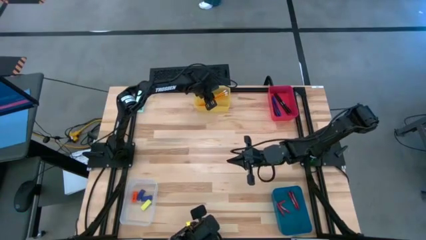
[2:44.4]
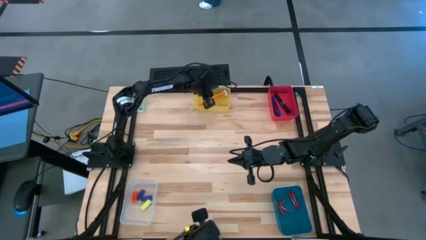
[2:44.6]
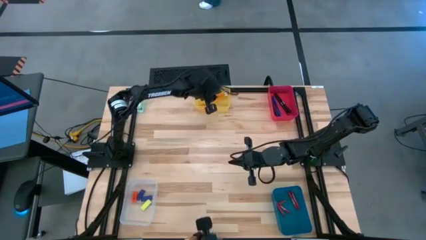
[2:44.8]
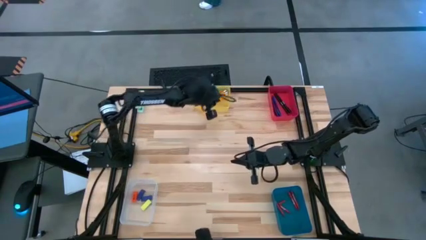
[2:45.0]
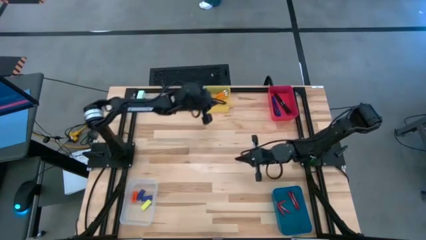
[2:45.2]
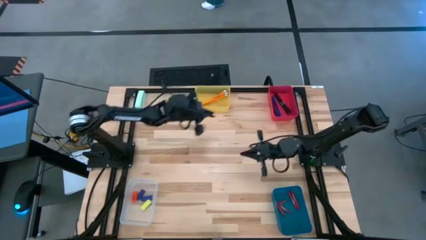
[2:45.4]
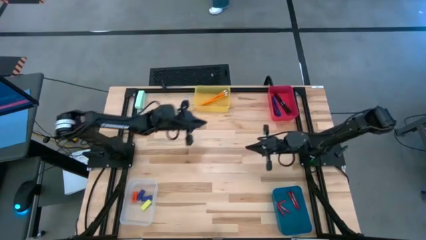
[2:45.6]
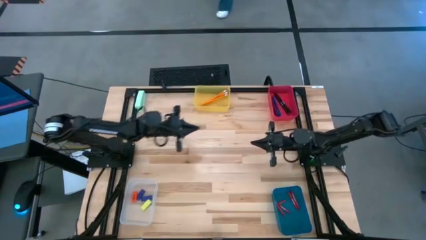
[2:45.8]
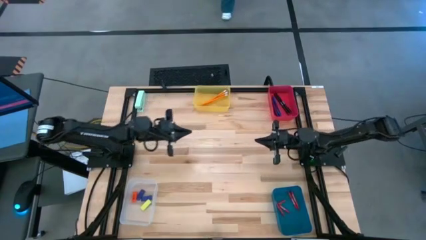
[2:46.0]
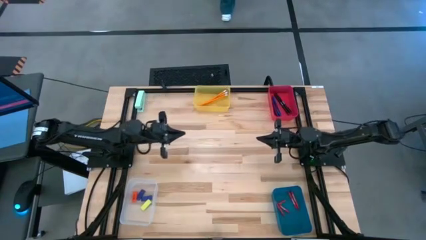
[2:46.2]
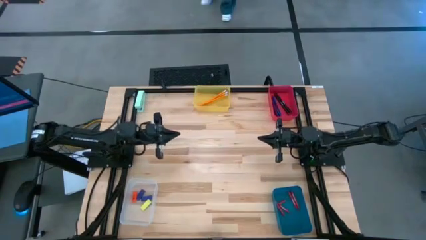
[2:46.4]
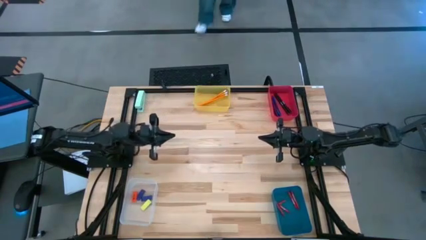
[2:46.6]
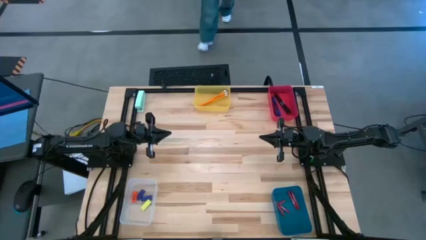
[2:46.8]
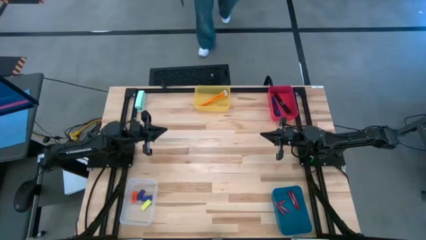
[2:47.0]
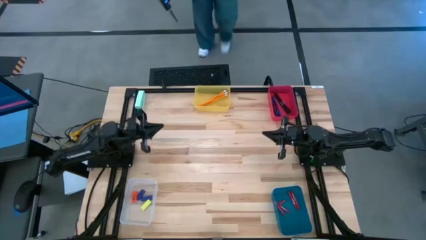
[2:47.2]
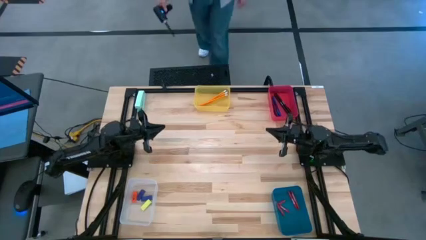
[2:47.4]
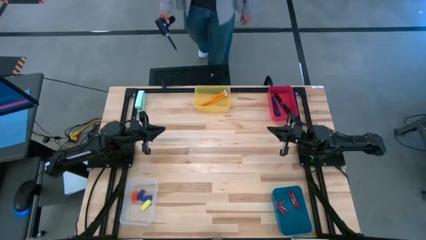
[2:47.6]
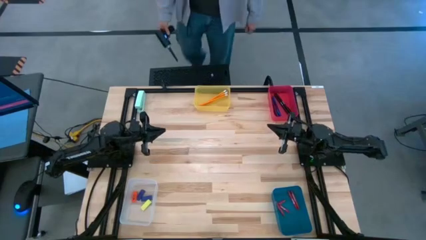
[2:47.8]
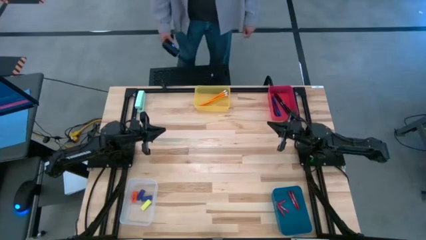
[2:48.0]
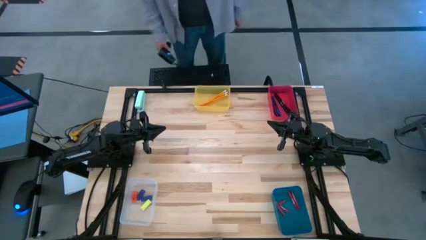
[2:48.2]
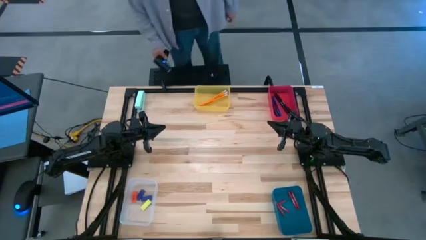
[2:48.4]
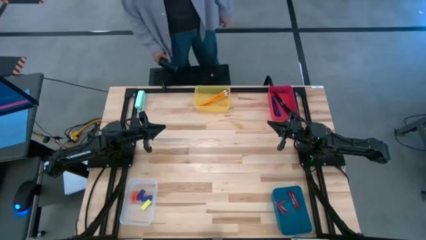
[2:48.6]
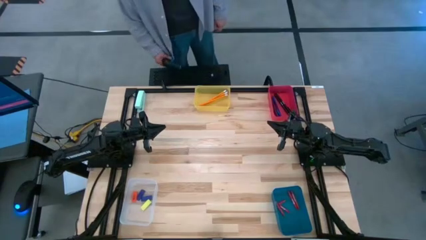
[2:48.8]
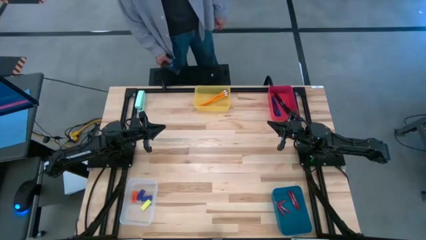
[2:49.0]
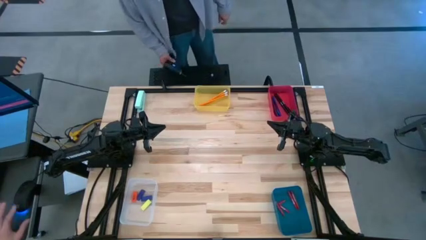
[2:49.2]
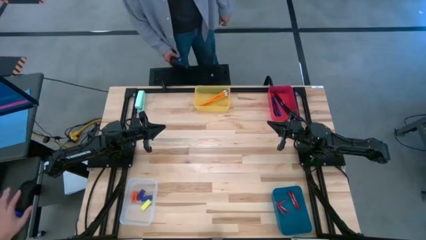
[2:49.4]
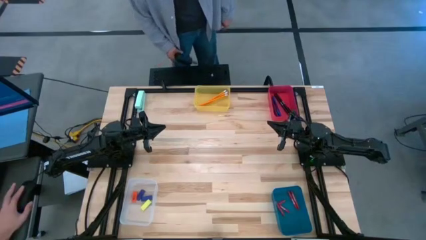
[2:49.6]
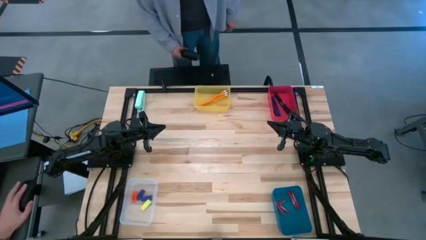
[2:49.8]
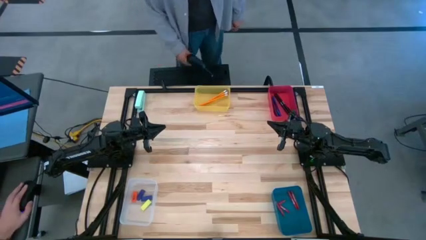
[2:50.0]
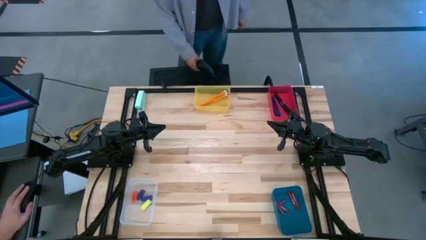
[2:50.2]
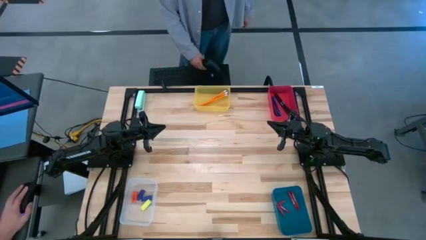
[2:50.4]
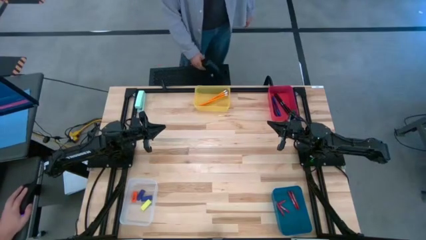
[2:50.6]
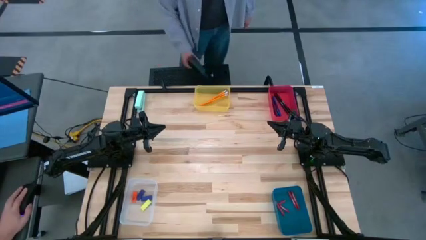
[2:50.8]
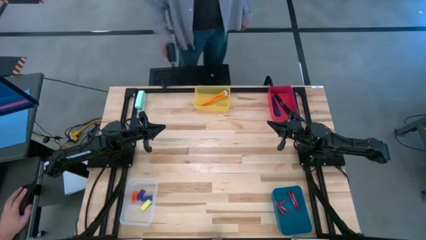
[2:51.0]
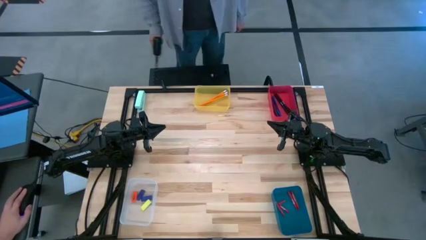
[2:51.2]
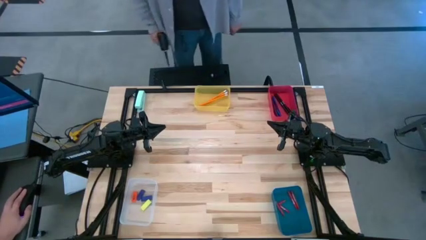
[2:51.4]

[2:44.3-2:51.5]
Task: Sort crayons/erasers/pens/pencils in bins
Return to Home Position

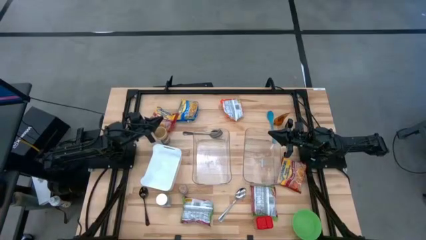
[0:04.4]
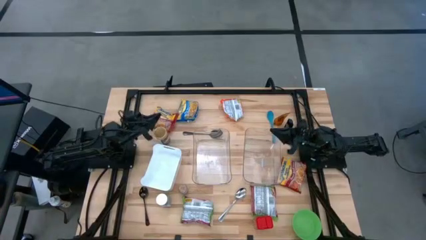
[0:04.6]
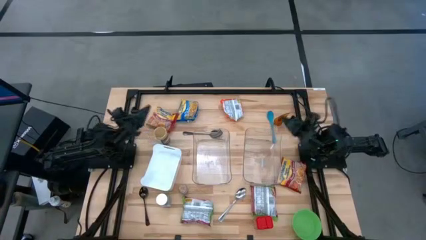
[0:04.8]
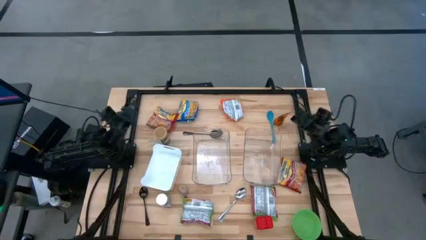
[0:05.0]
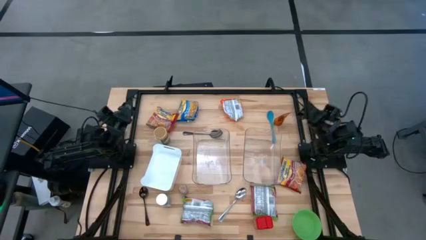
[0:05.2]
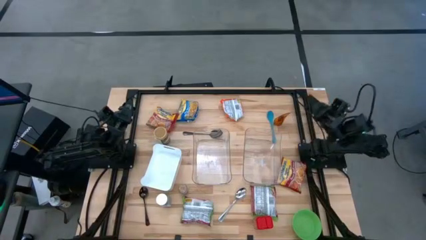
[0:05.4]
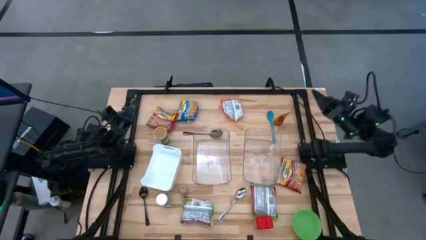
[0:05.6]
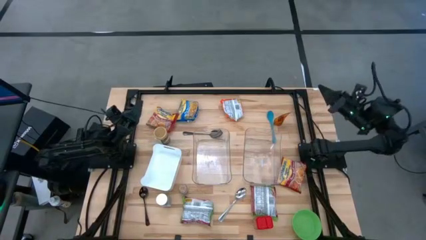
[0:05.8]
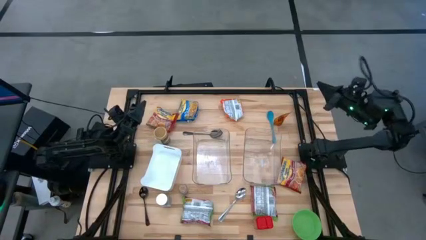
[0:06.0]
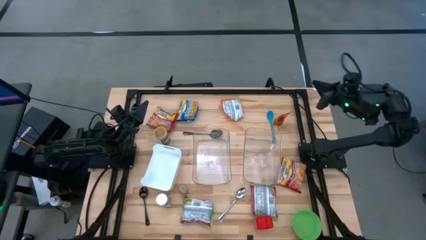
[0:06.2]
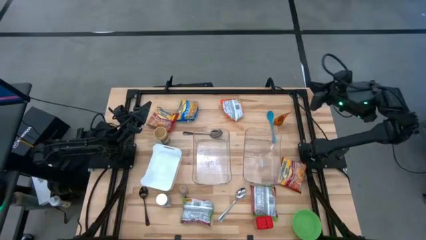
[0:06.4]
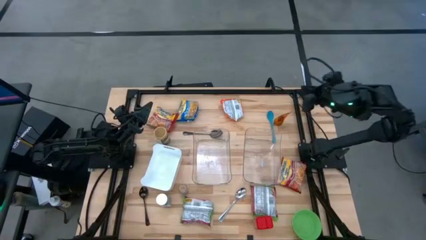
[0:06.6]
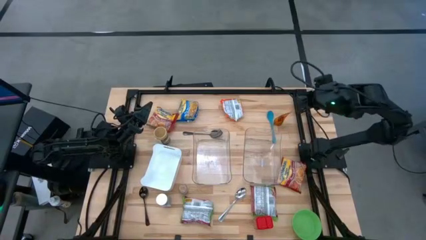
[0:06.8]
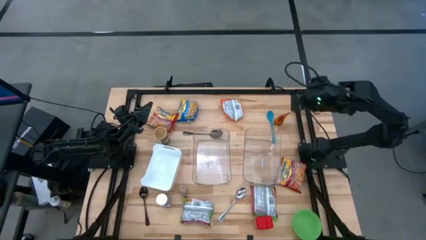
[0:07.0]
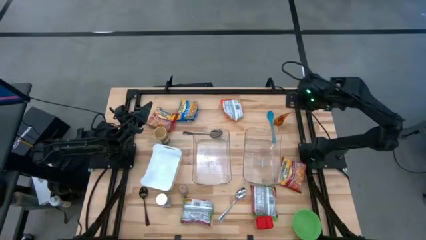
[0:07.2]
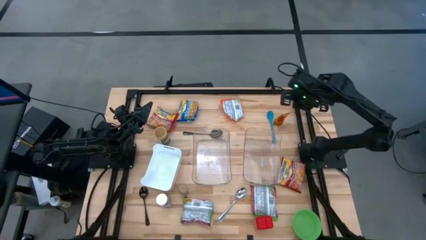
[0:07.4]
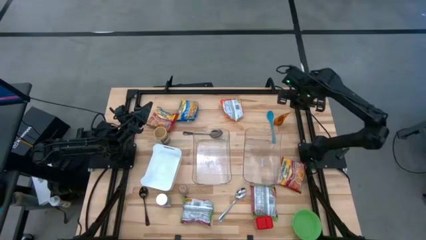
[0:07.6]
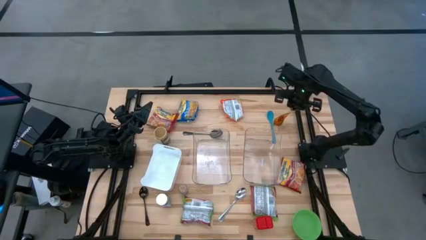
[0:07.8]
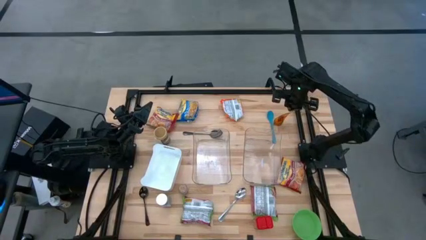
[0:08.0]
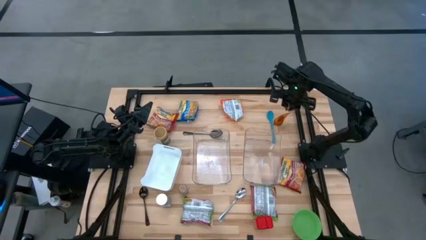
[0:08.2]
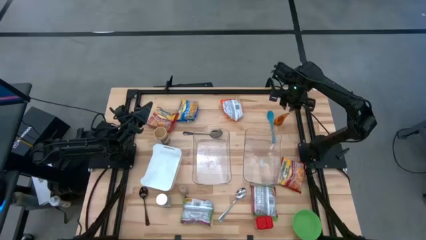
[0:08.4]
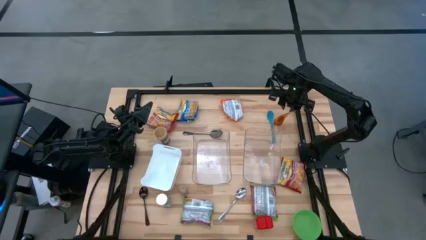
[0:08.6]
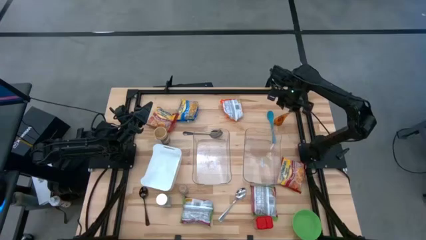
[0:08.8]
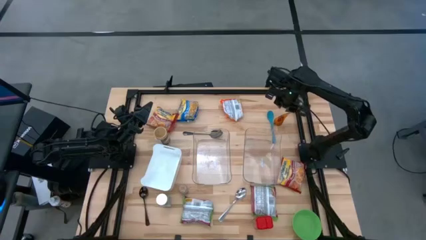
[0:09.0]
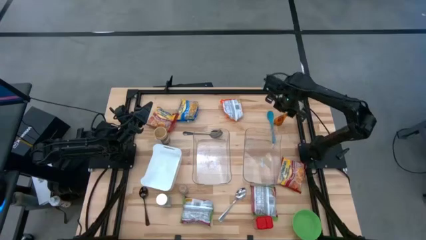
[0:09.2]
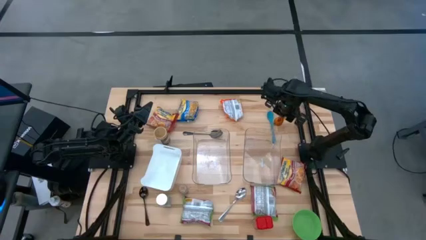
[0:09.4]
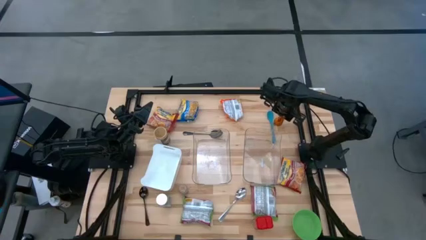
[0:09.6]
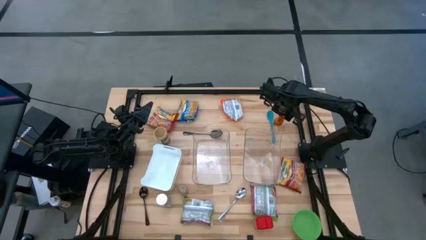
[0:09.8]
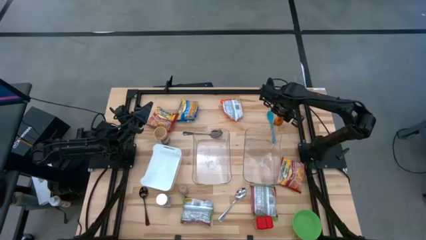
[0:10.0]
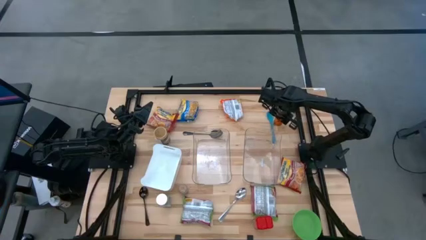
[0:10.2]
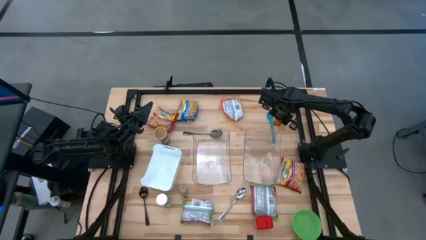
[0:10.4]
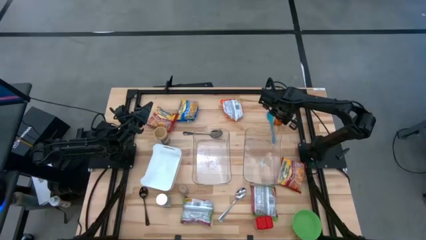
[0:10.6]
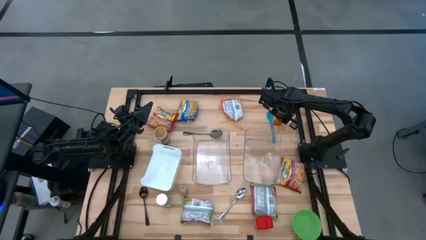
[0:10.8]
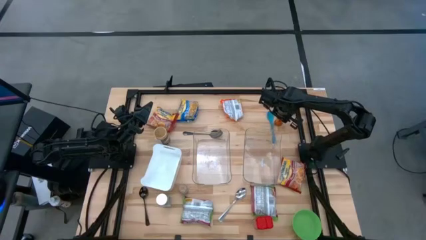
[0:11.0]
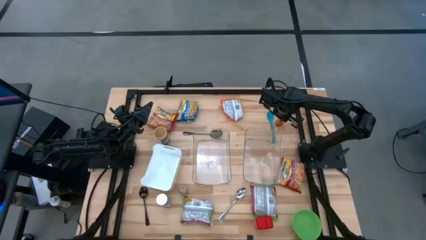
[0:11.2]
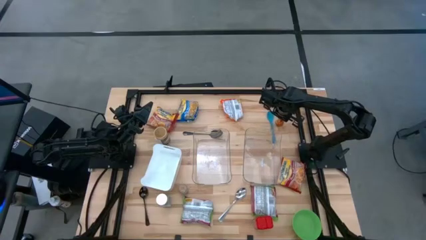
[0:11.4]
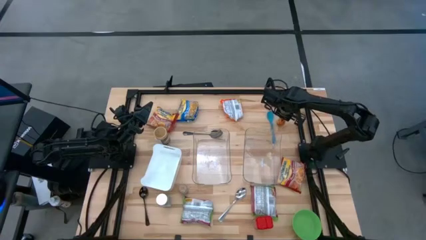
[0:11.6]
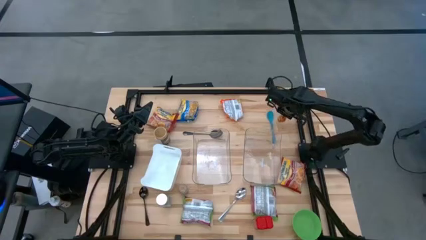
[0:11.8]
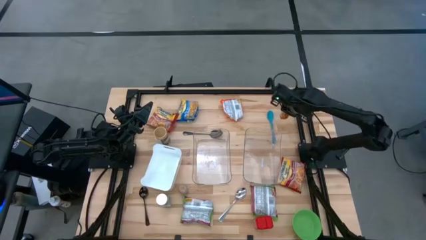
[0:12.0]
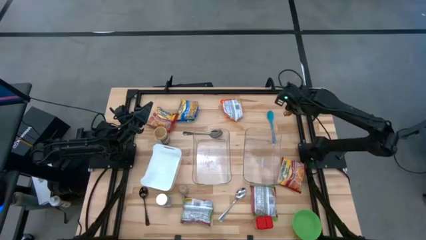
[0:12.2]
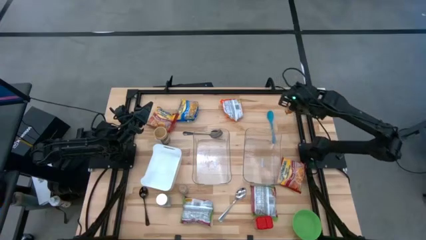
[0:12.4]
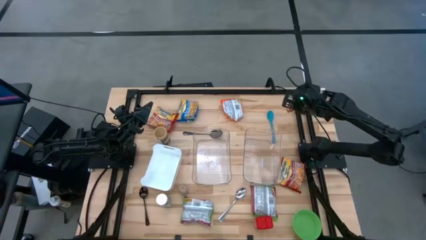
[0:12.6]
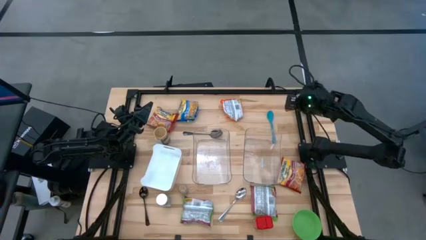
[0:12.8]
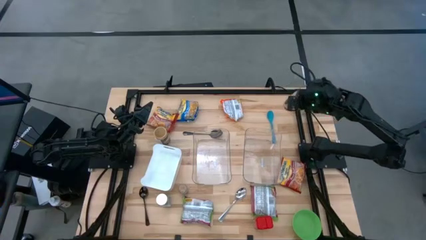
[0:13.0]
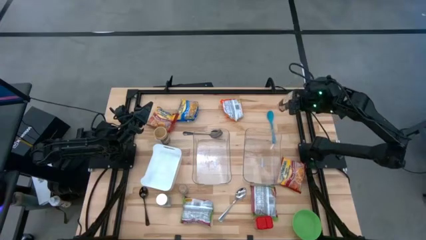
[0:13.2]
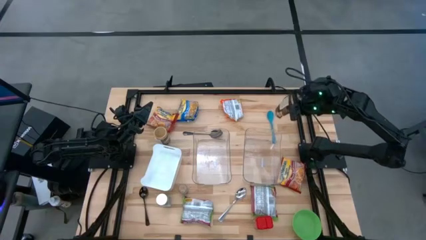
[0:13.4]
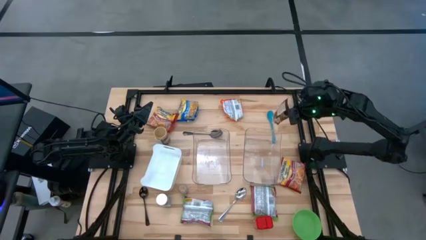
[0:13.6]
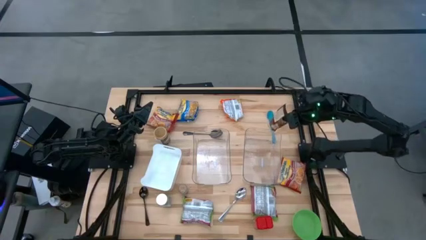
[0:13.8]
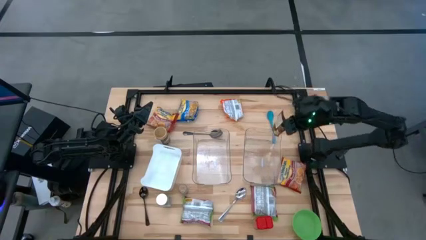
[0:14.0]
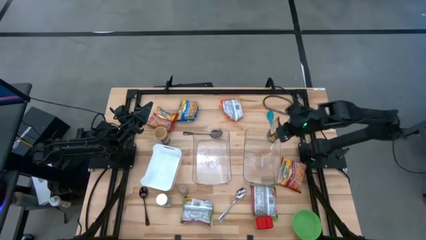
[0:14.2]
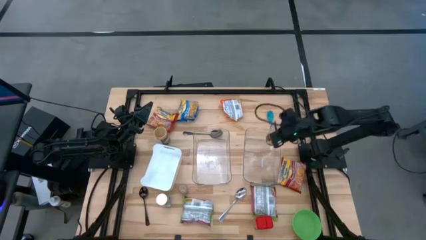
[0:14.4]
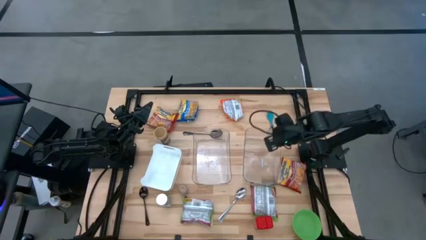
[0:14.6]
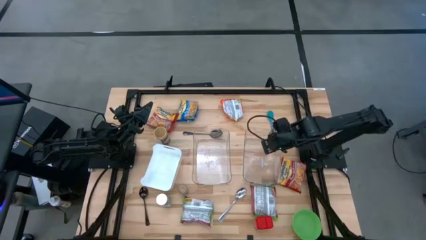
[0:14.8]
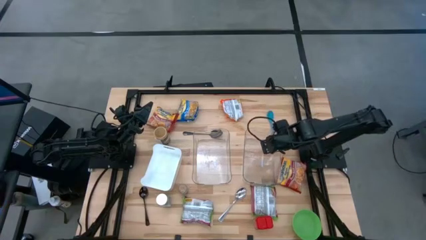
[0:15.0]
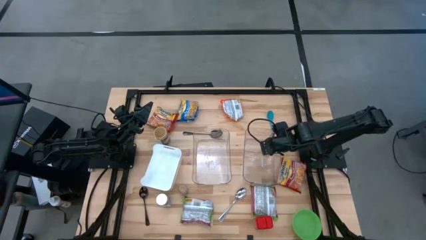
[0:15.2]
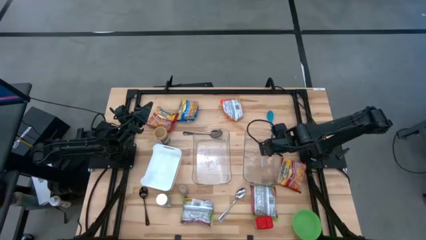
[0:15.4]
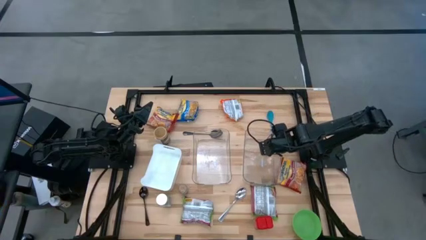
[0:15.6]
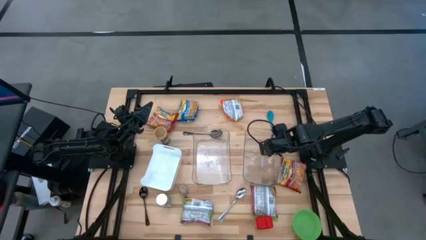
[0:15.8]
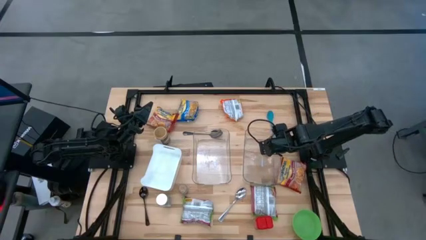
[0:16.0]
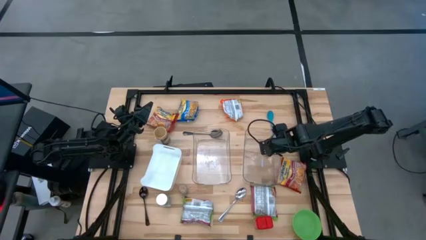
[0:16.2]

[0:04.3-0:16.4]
Task: Pick & Place Food Item
Put the orange seasoning pack into the right transparent bin
